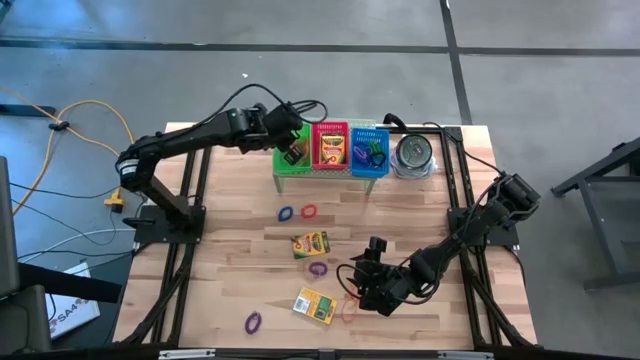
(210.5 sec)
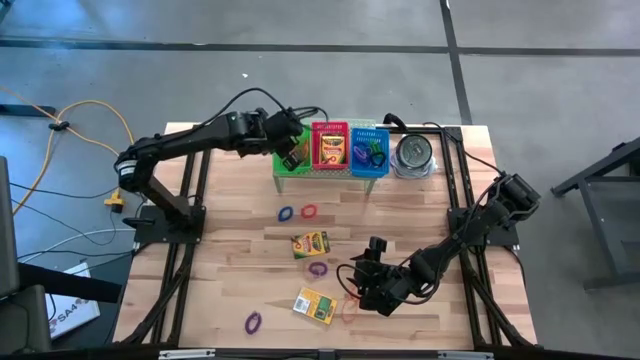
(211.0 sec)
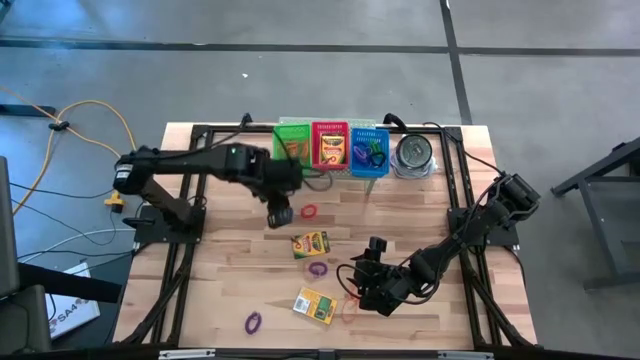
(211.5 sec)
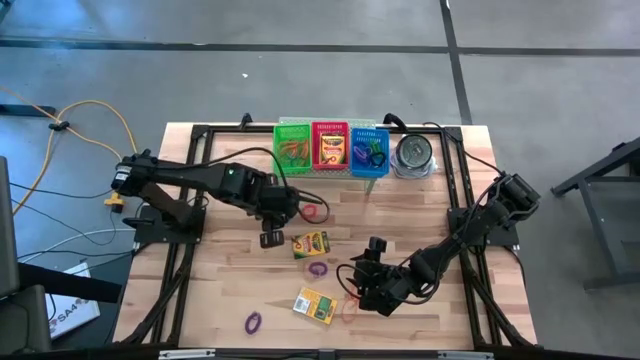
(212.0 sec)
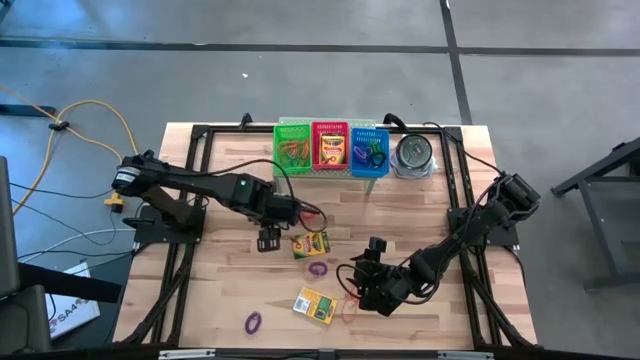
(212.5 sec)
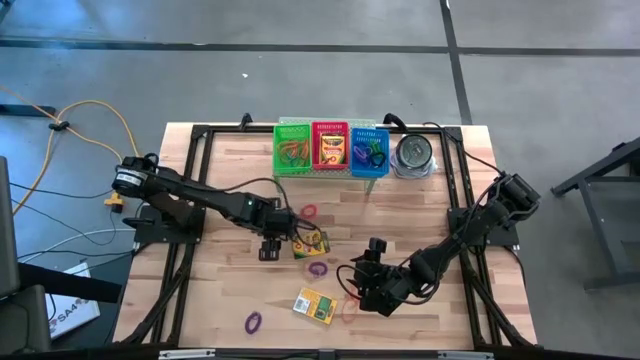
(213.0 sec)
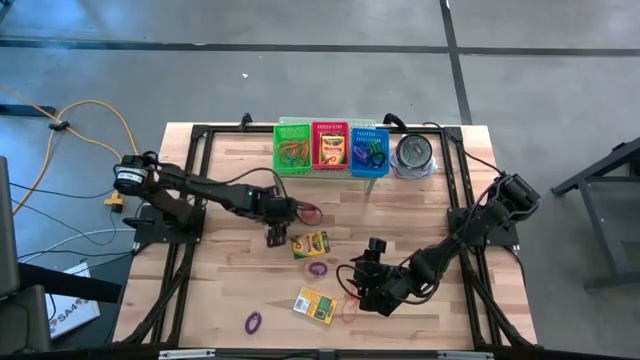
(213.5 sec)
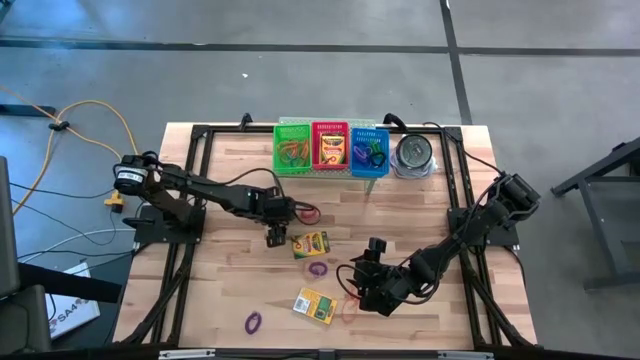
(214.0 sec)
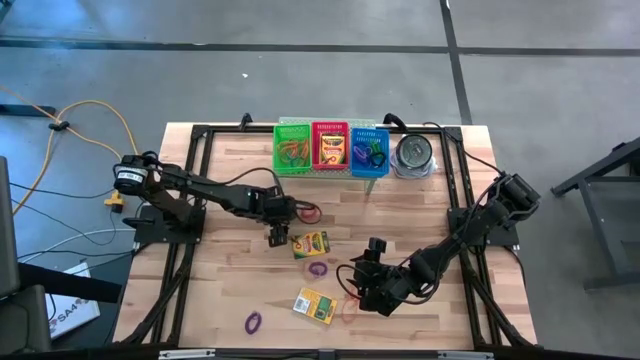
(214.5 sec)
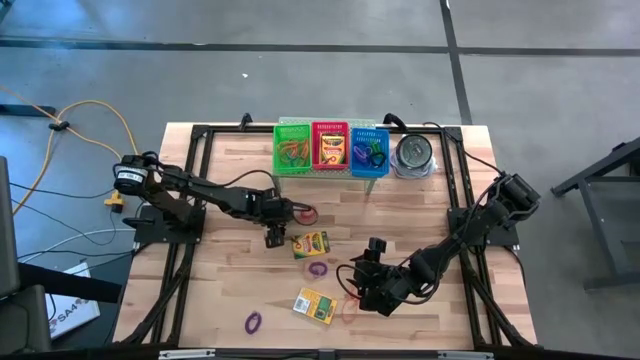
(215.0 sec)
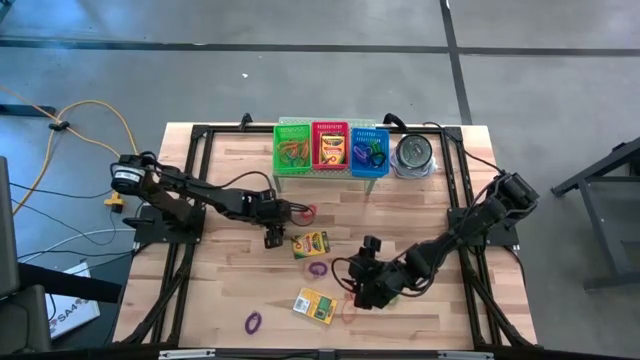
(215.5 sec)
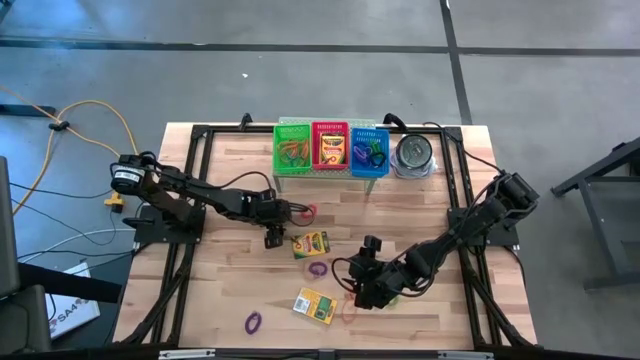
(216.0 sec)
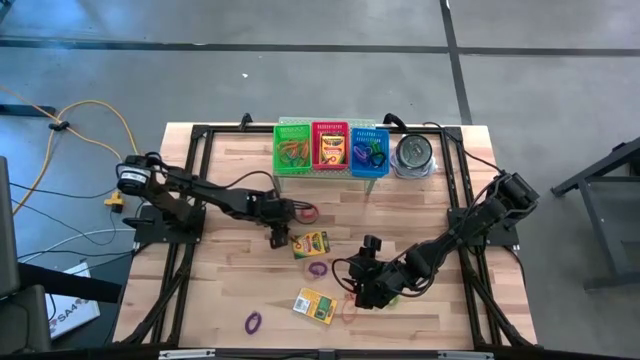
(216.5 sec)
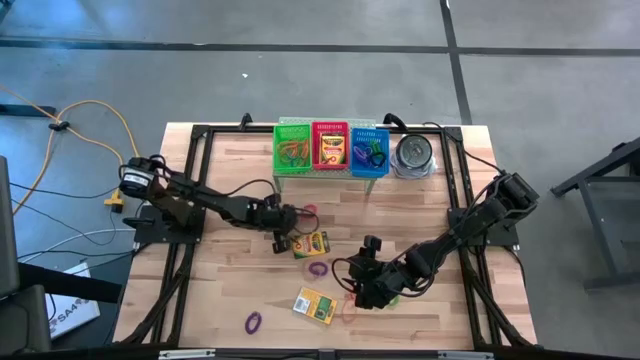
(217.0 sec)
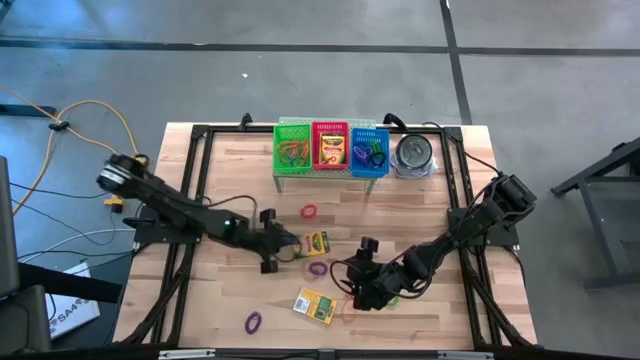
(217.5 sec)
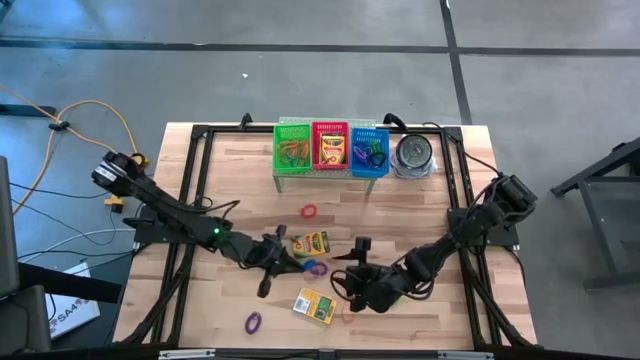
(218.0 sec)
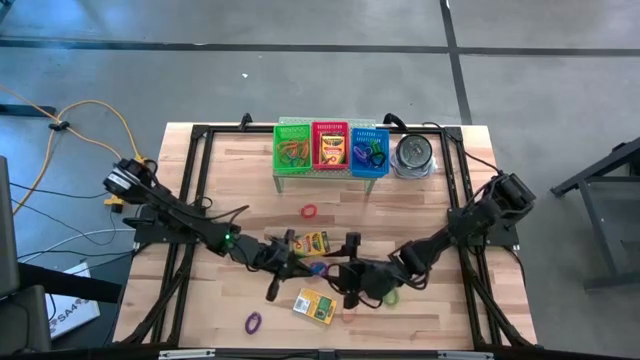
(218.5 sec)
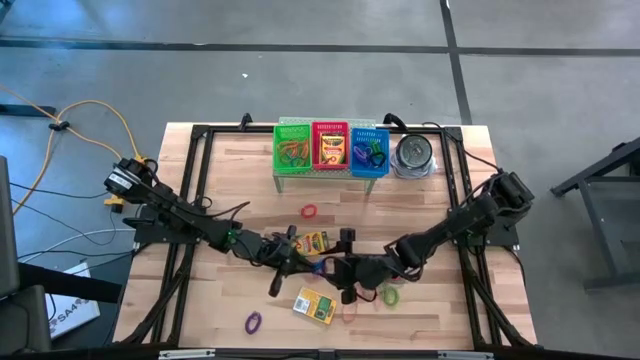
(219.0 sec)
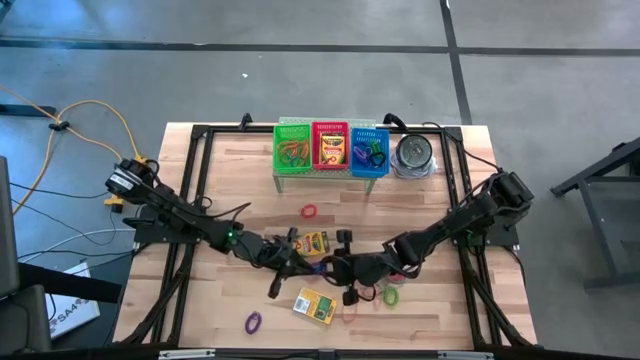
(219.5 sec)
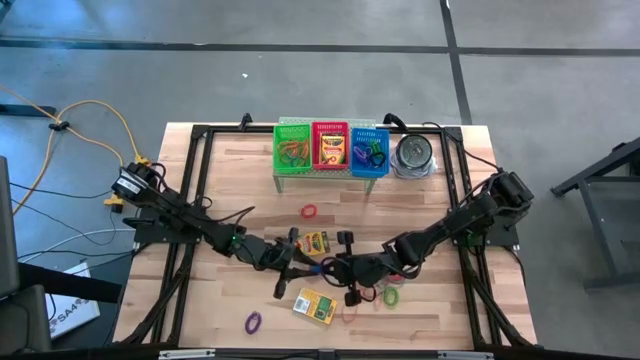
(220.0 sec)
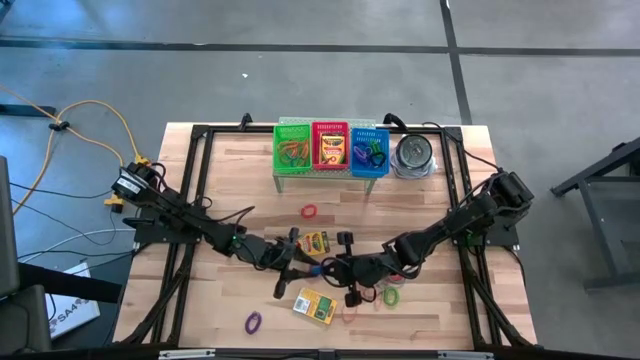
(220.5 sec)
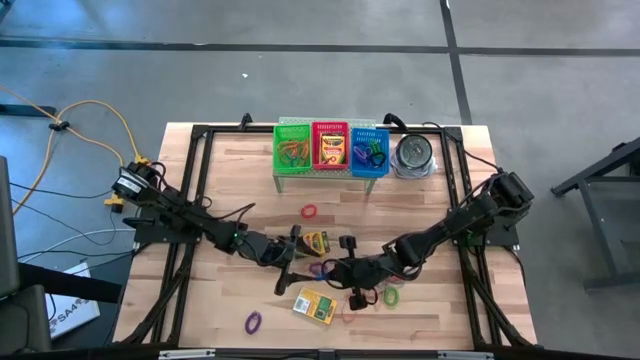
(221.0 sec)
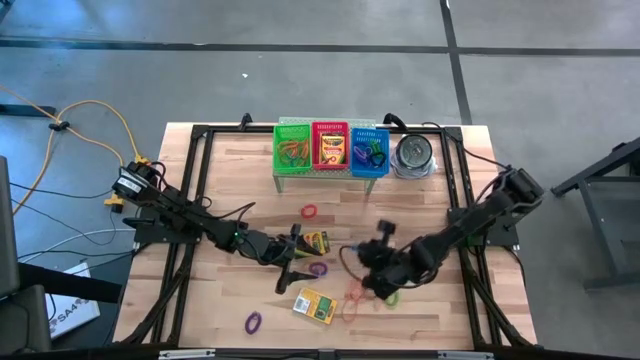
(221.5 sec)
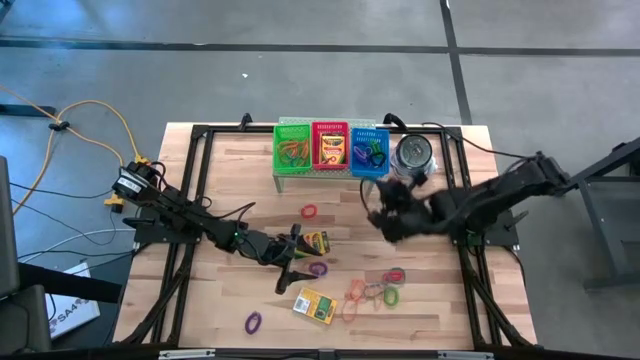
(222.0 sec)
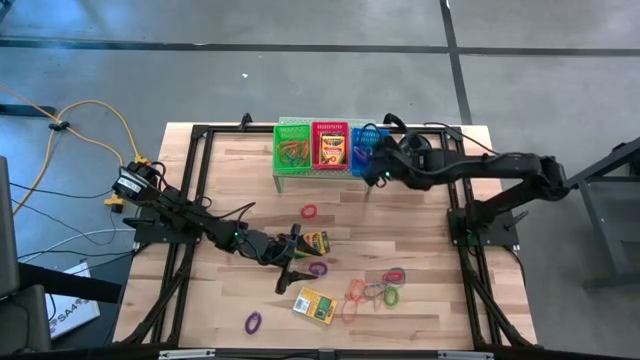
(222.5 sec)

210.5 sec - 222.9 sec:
Task: Pick & Place Office Desk Supplies
Put the blue spring keychain into the blue bin on the shelf
